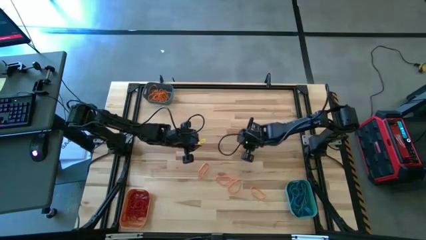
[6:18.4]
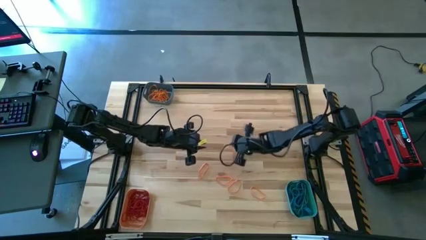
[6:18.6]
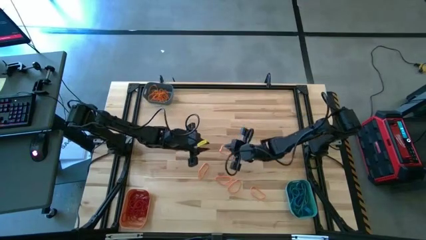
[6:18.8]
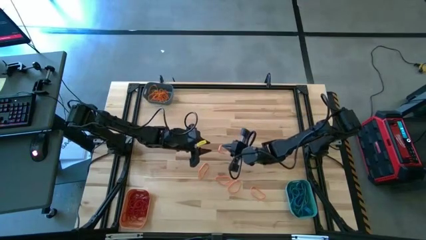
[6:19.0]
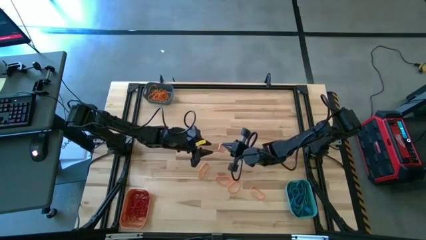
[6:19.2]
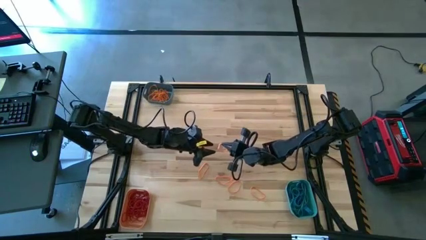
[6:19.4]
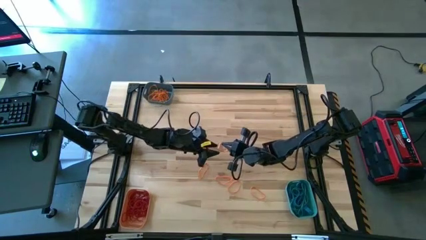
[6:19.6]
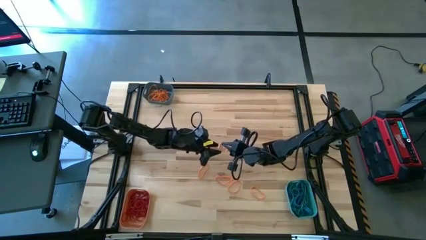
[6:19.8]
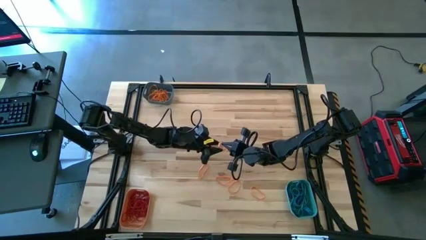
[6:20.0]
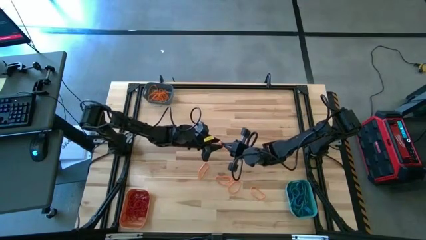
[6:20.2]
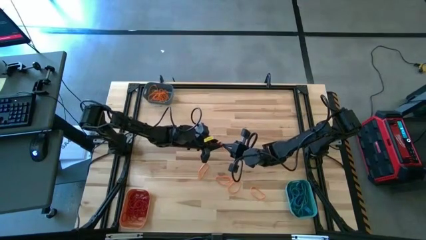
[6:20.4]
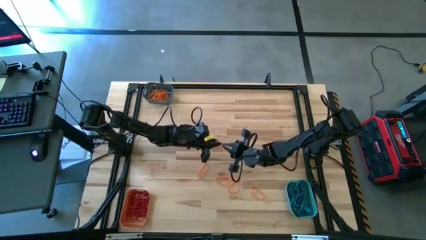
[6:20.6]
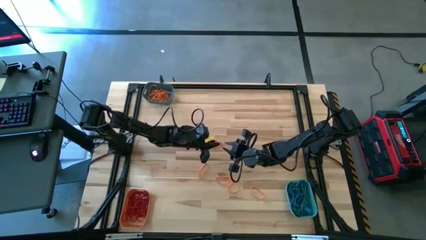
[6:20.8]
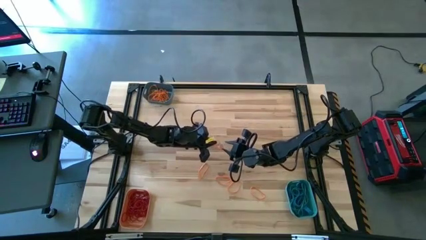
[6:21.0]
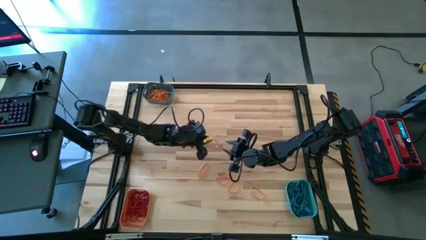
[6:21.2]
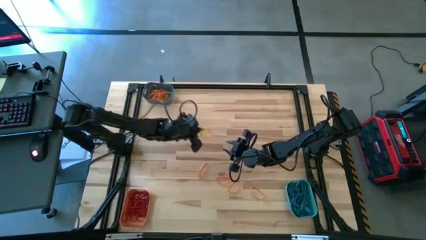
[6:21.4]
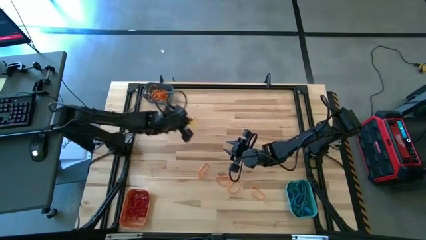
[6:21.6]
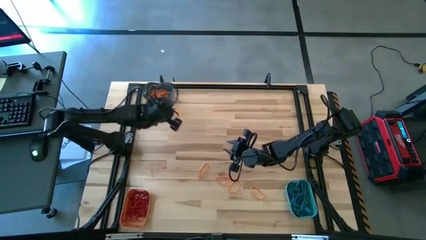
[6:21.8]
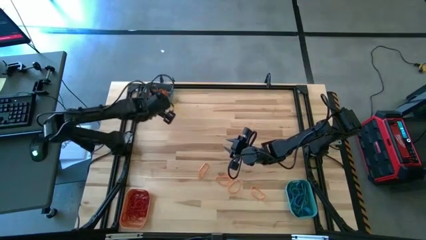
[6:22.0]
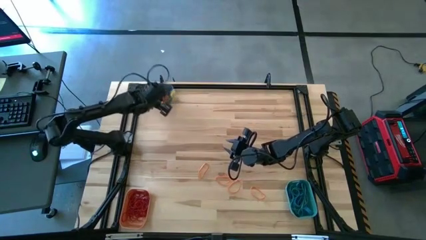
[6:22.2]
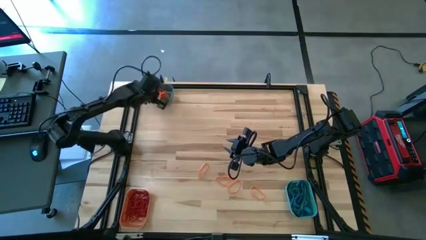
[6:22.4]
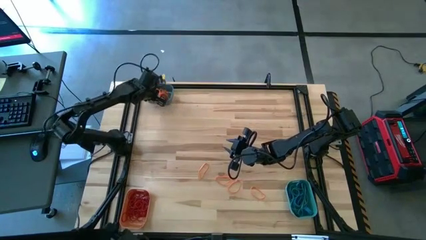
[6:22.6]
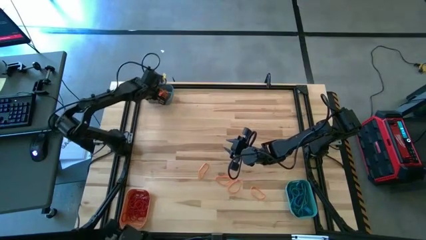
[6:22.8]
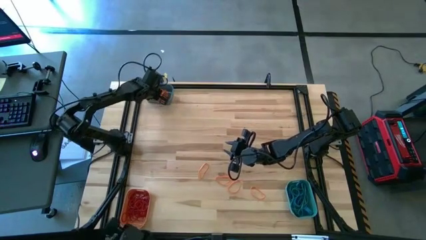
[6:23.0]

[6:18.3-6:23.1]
Task: Sort rubber bands into baskets
Put the orange rubber band into the blue bin

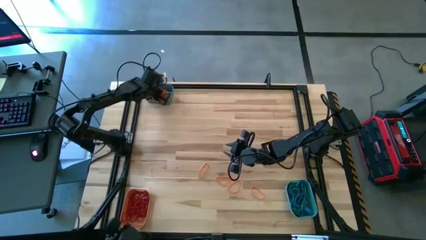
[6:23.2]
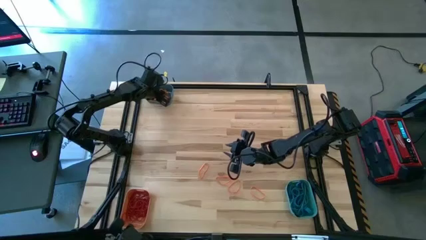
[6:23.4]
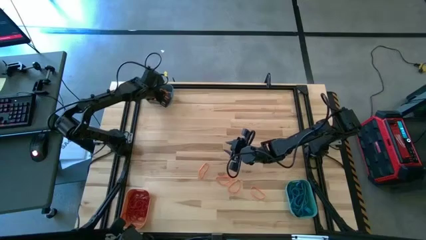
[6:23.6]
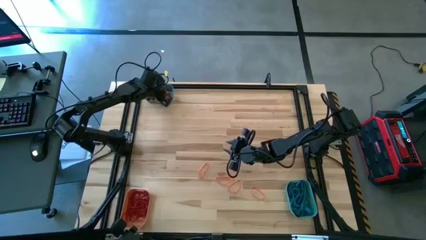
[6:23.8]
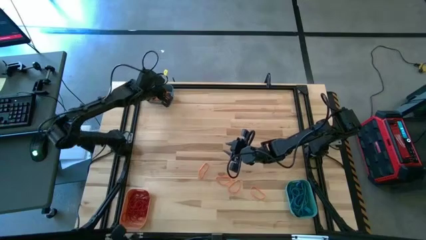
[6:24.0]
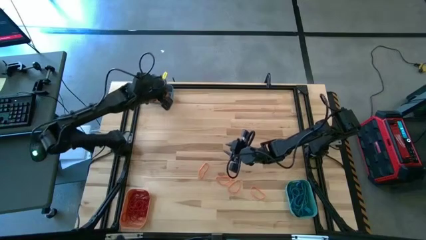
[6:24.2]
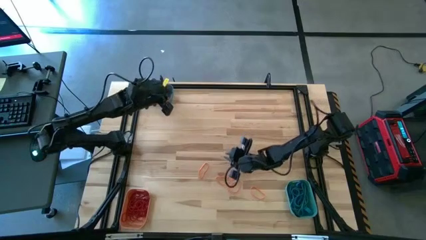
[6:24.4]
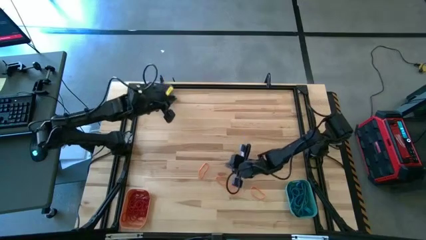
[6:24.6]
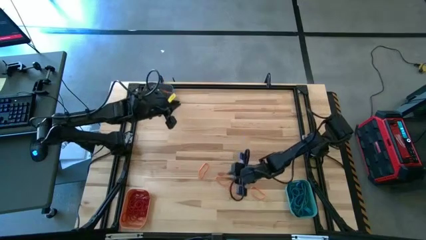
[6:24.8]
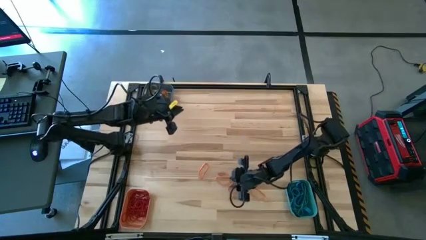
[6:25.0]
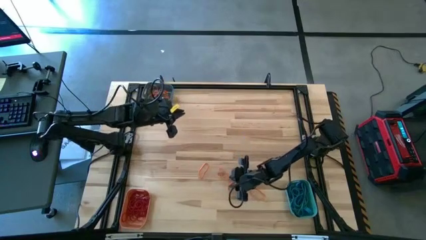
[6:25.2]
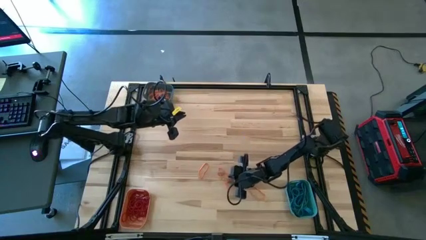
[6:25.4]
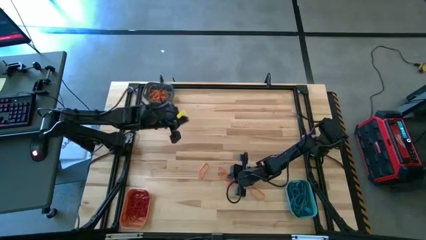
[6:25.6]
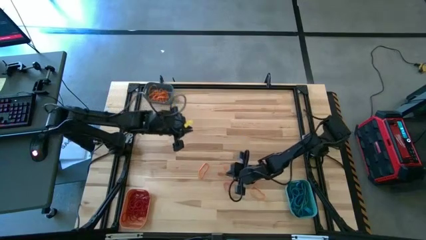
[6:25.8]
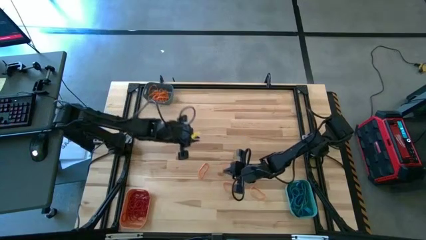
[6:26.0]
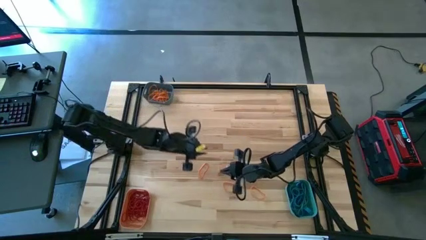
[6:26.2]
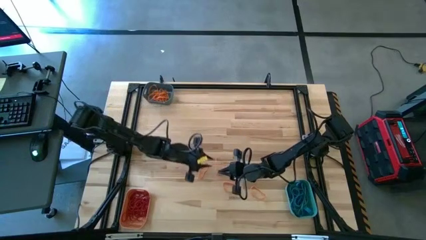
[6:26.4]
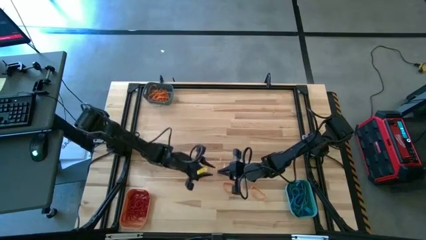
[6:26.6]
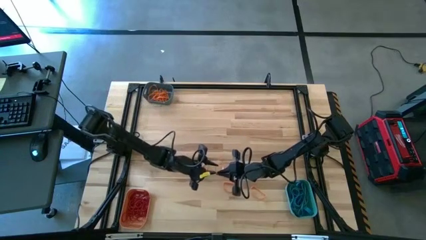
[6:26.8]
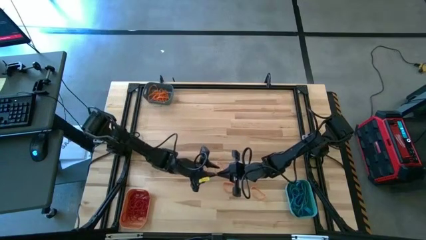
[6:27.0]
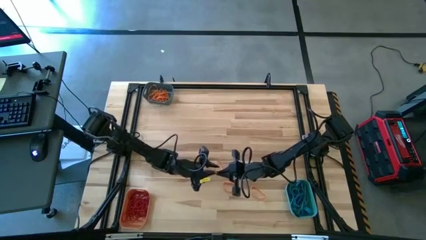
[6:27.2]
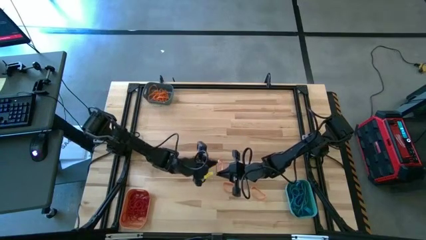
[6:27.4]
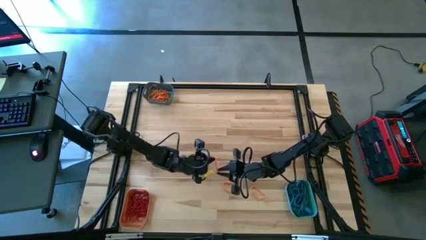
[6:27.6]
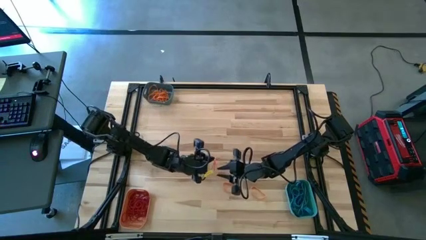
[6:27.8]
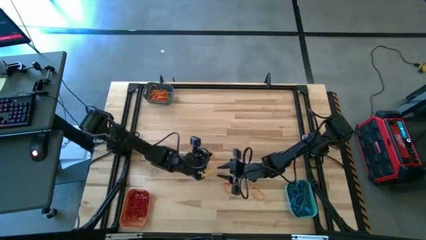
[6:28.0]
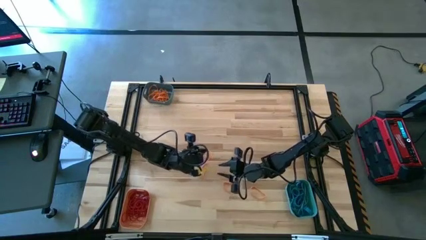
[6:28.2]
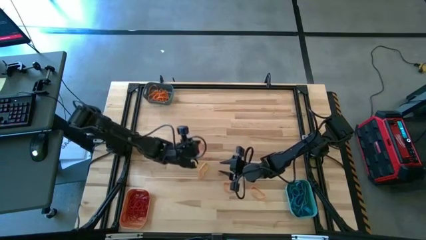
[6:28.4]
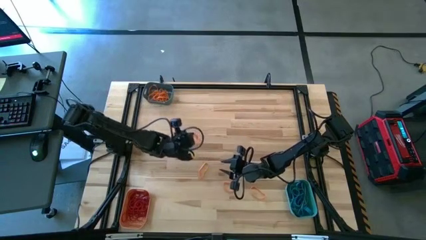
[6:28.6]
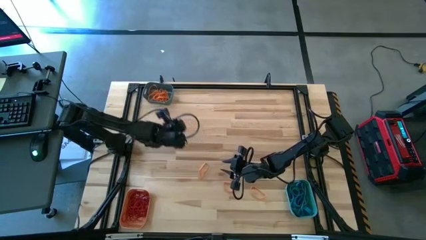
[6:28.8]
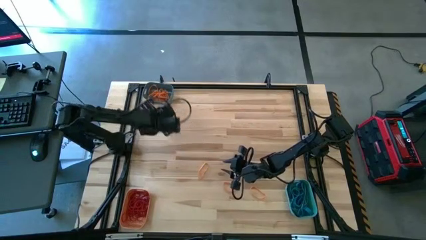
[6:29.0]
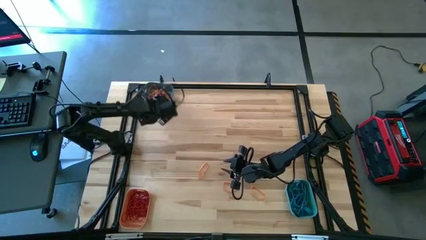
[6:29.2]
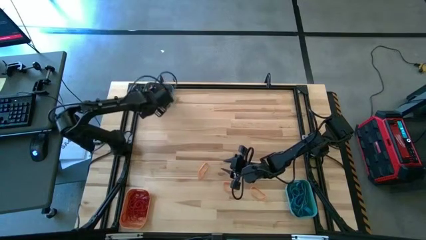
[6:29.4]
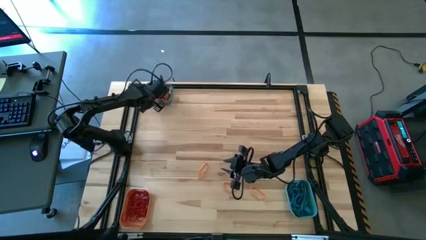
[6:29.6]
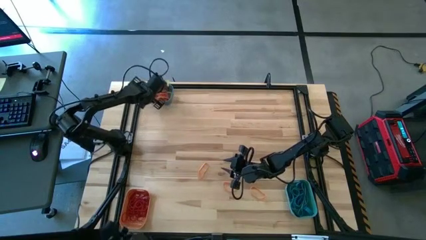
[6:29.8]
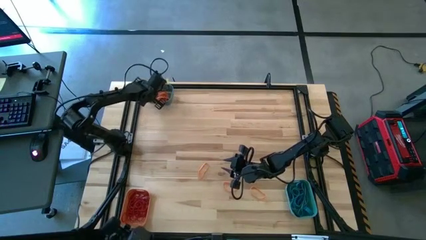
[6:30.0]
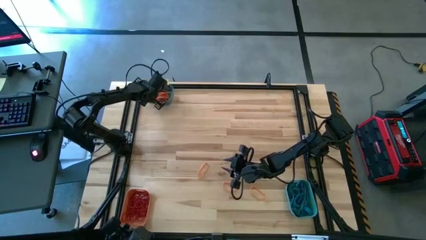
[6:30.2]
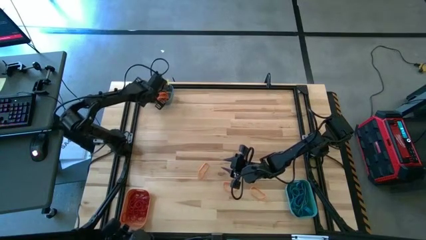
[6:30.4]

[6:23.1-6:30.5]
Put the orange rubber band into the blue bin

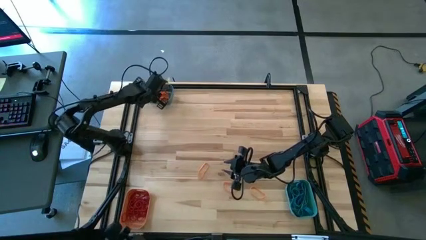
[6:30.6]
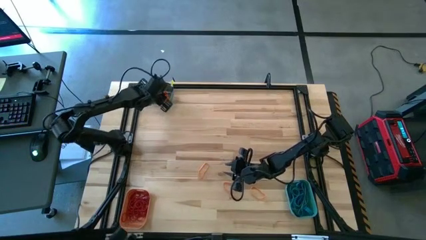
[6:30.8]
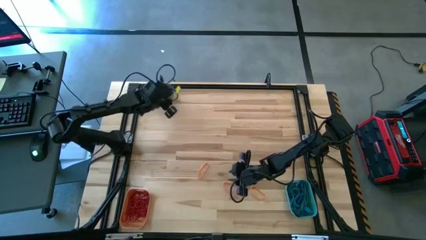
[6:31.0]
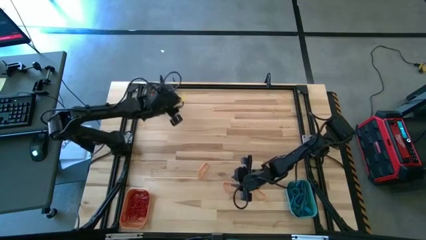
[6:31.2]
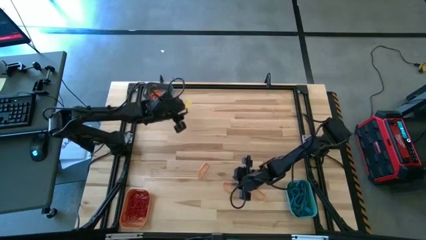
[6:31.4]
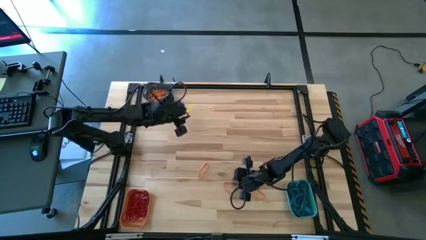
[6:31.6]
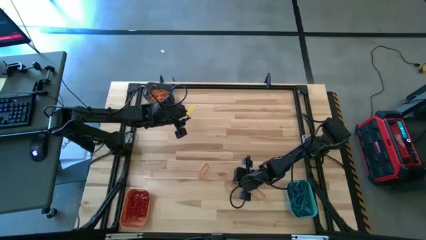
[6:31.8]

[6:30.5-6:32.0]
Put the orange rubber band into the blue bin

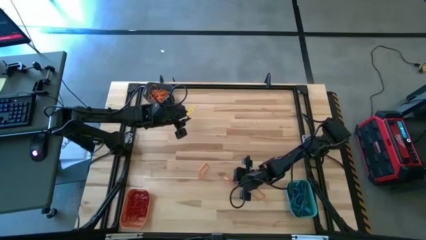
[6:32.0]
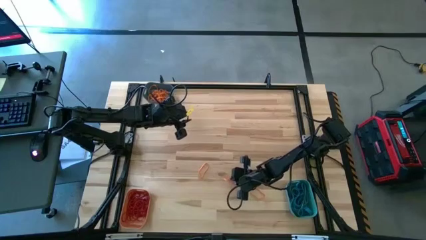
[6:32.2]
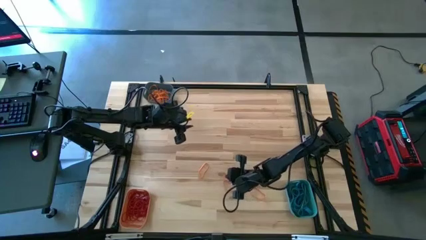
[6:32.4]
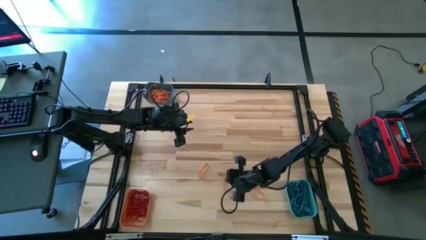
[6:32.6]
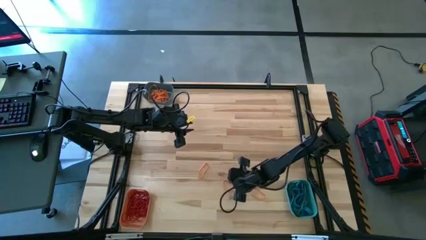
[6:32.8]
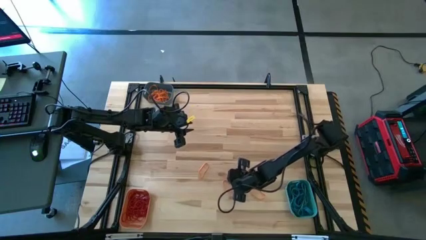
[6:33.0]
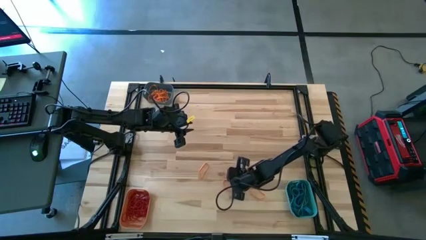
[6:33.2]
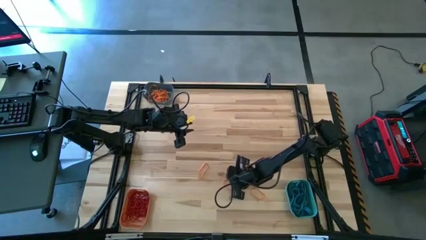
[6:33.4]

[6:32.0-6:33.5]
Put the orange rubber band into the blue bin
